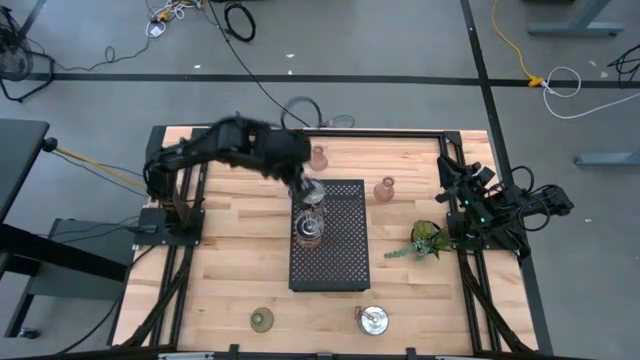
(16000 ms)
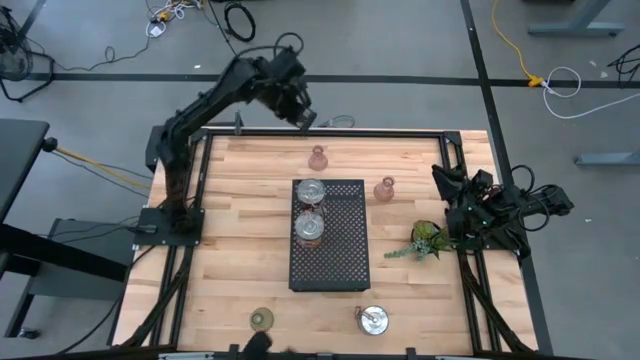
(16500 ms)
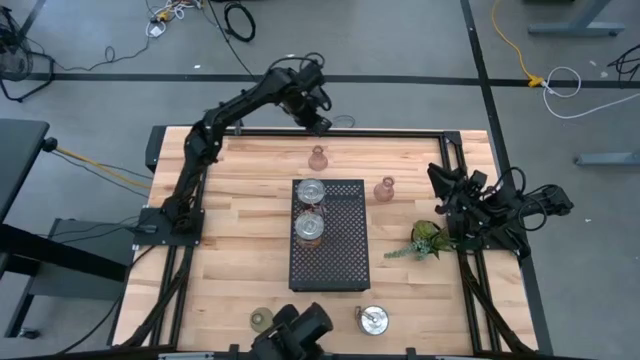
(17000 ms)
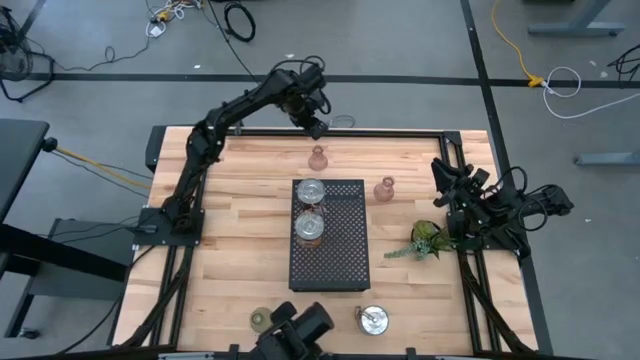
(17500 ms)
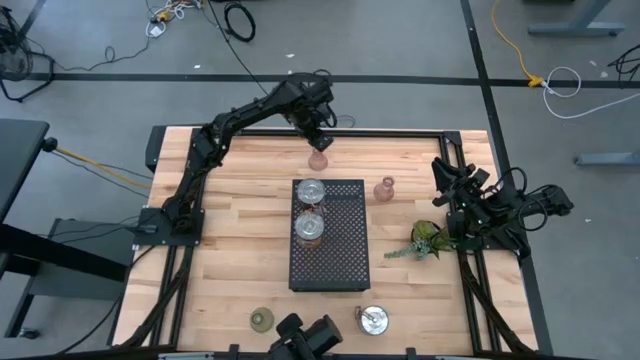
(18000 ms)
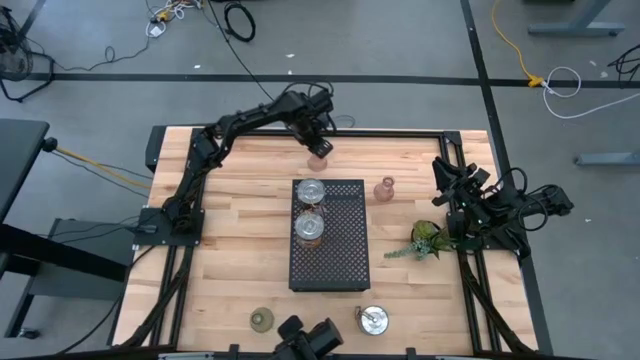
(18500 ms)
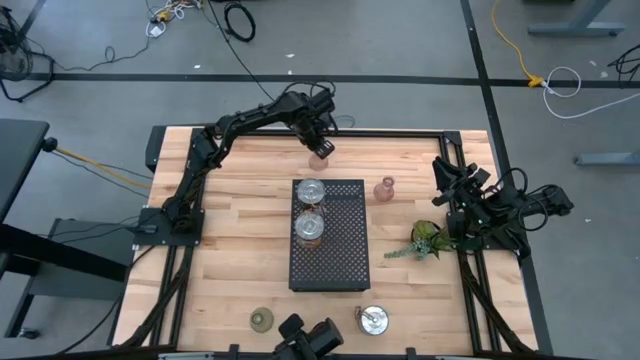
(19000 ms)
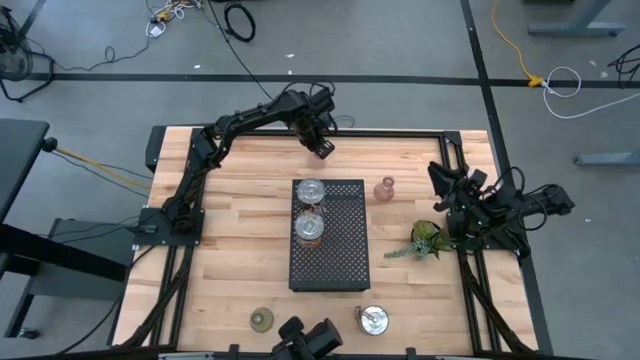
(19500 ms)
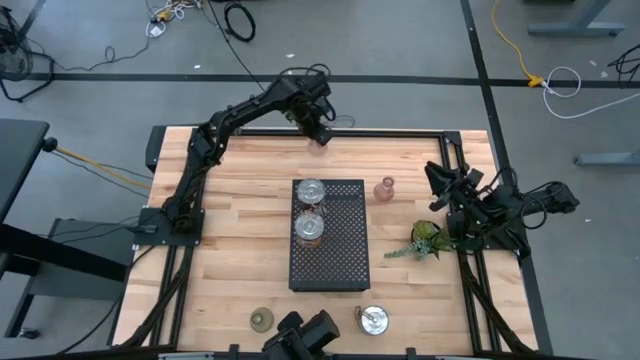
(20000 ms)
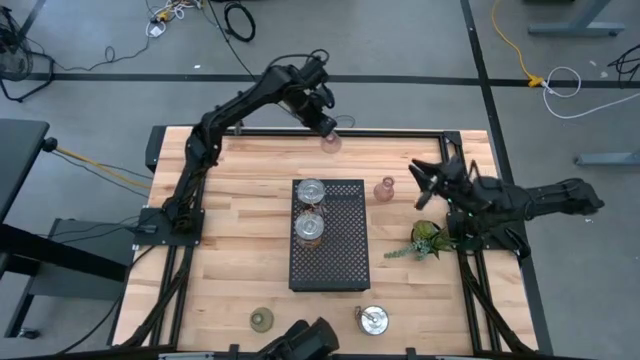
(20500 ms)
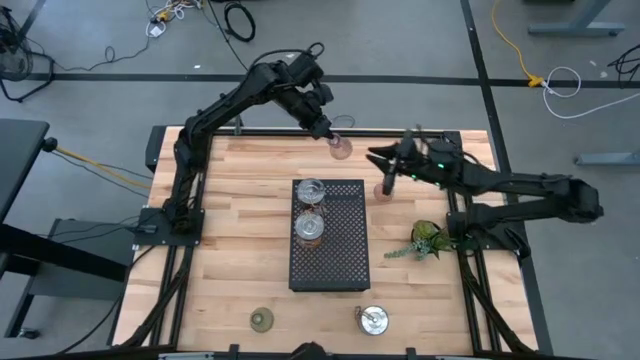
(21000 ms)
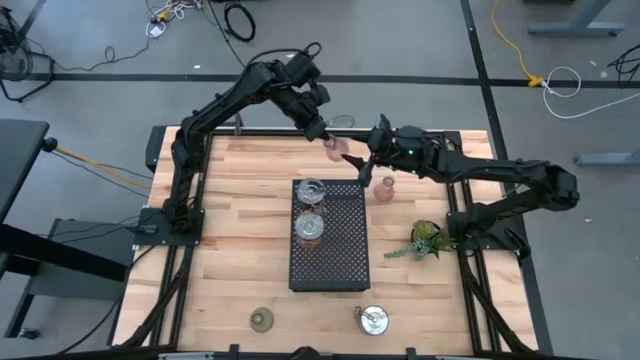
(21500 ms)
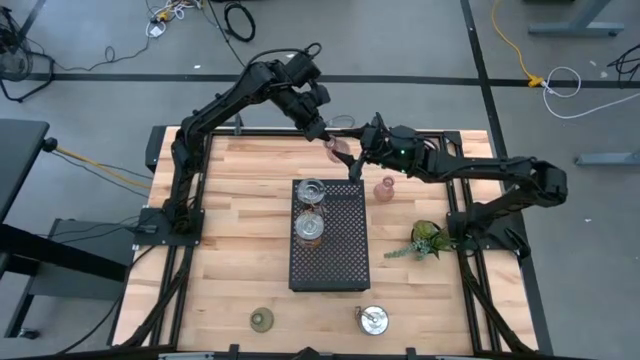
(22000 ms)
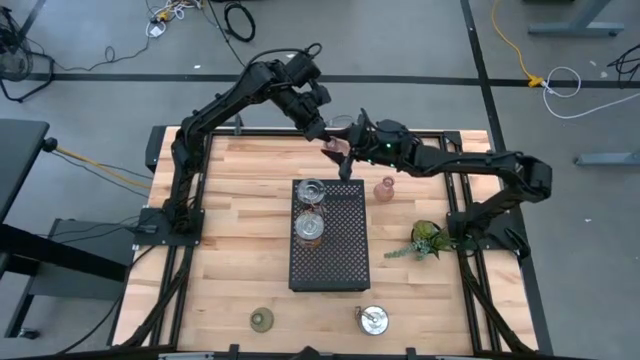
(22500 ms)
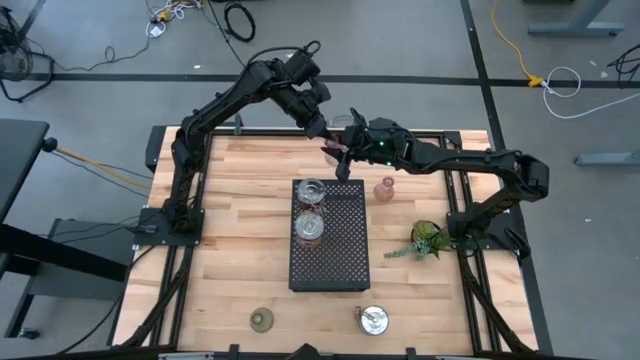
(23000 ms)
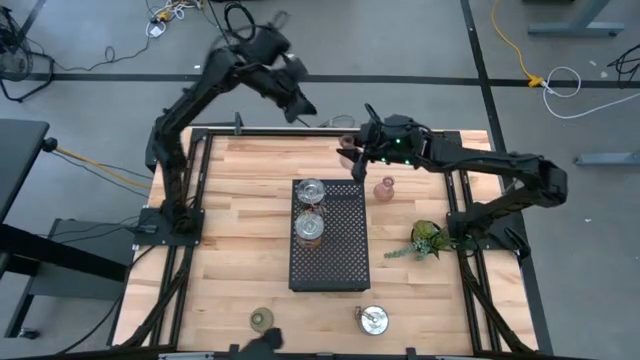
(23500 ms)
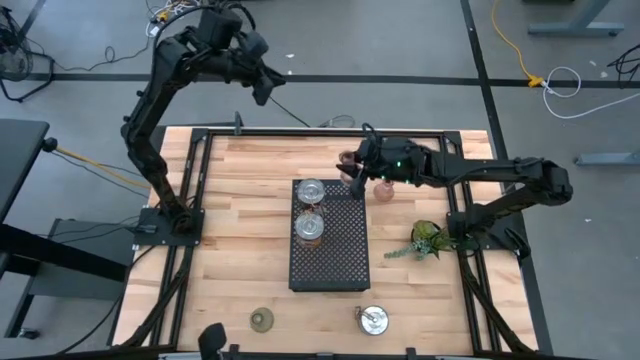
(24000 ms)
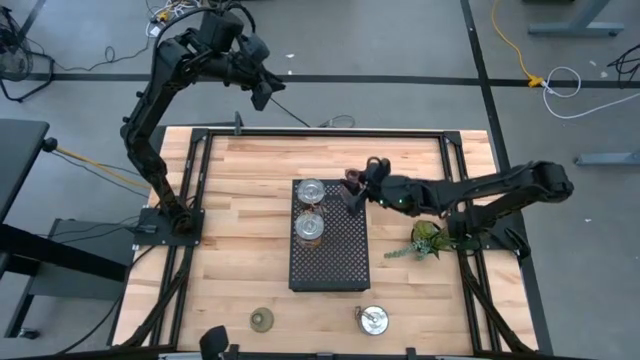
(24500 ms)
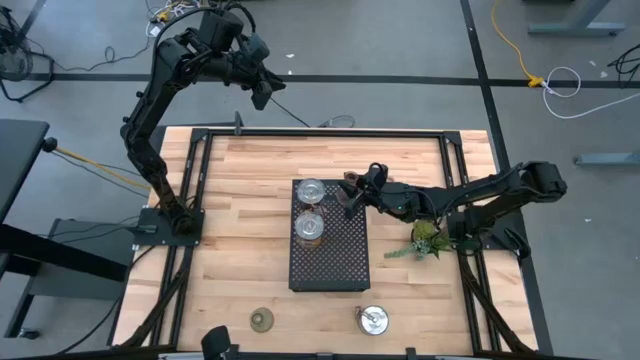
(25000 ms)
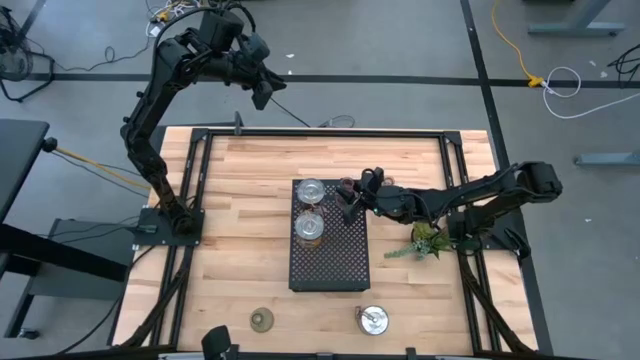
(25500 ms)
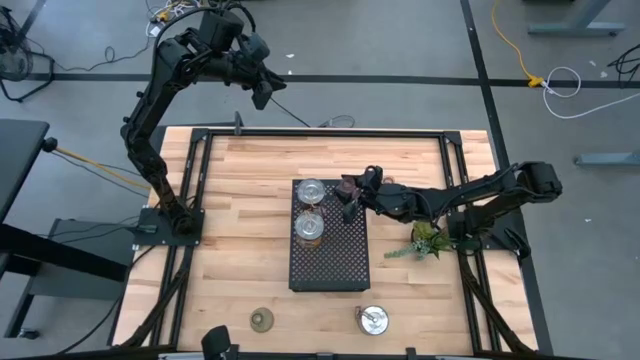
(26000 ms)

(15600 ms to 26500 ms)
Task: Pick & Place candle stick holders
Put the left pink glass candle holder on the shelf

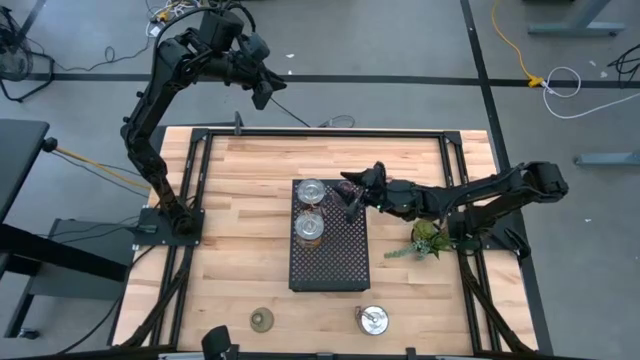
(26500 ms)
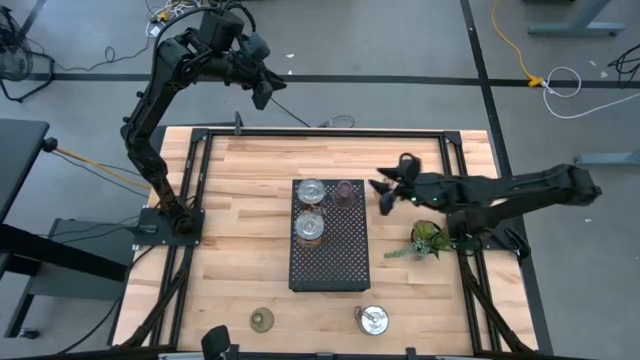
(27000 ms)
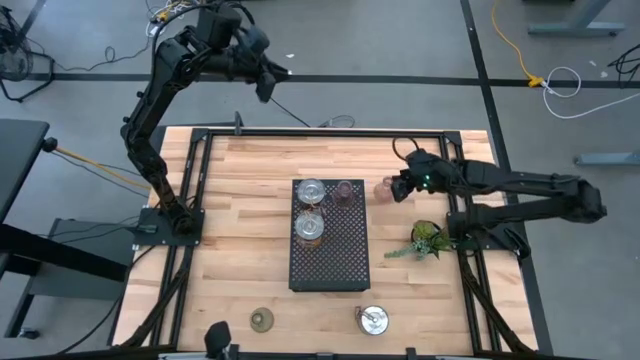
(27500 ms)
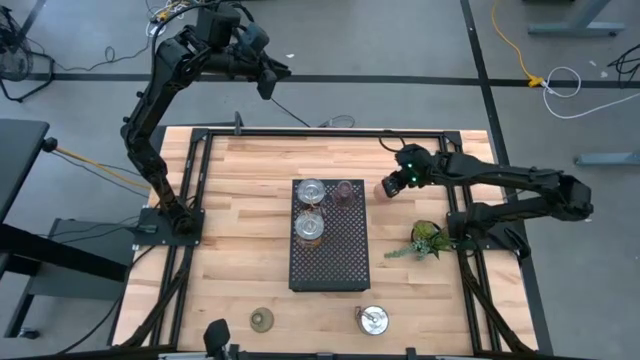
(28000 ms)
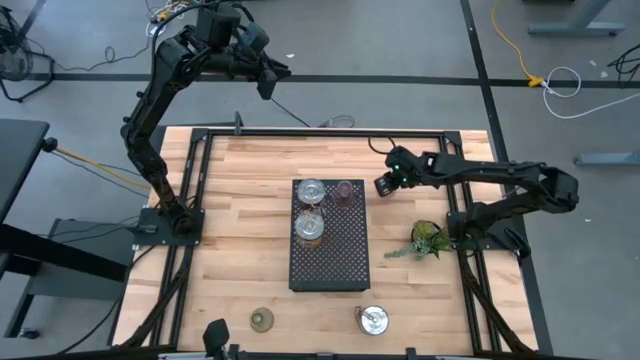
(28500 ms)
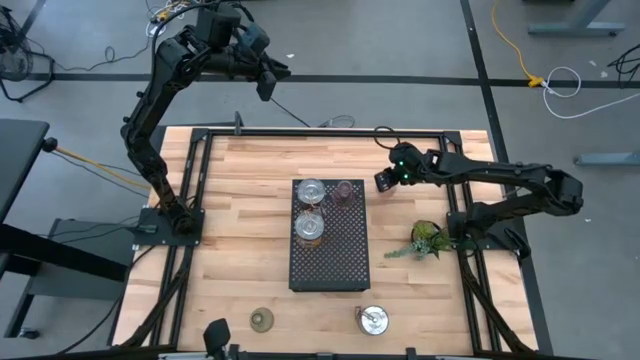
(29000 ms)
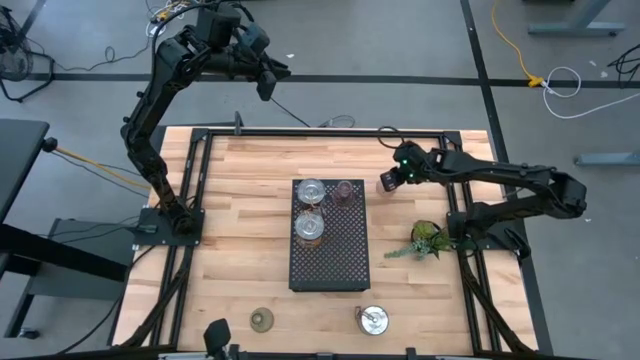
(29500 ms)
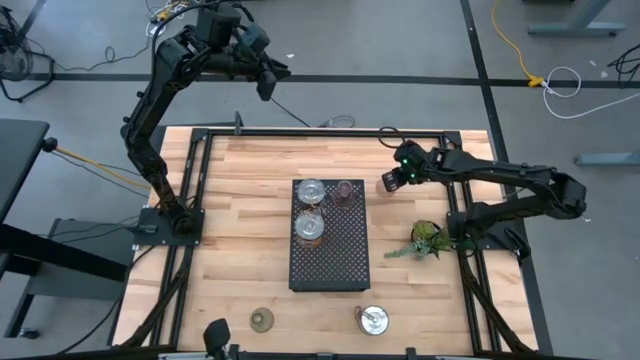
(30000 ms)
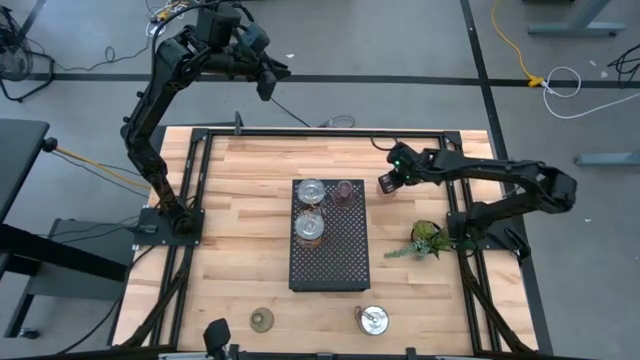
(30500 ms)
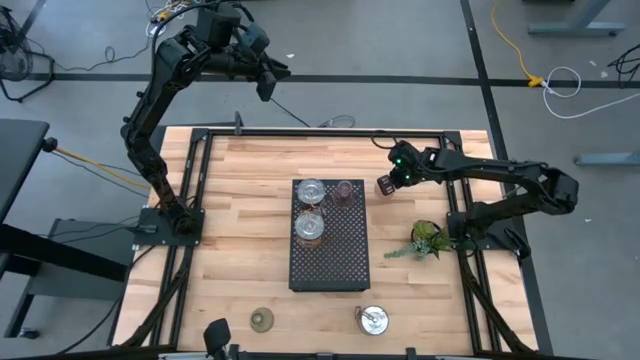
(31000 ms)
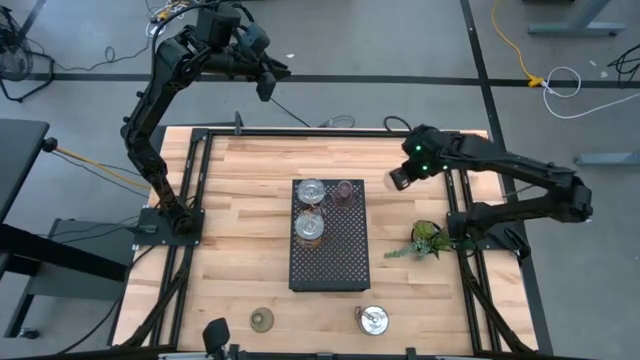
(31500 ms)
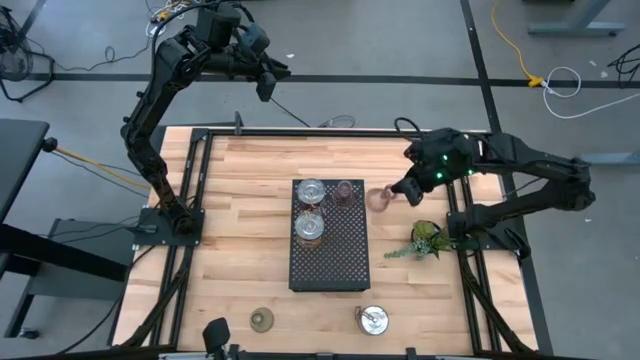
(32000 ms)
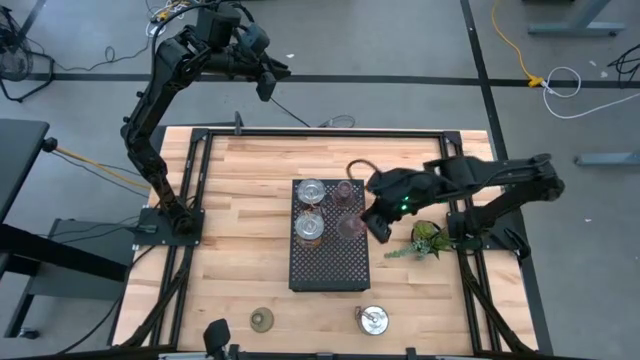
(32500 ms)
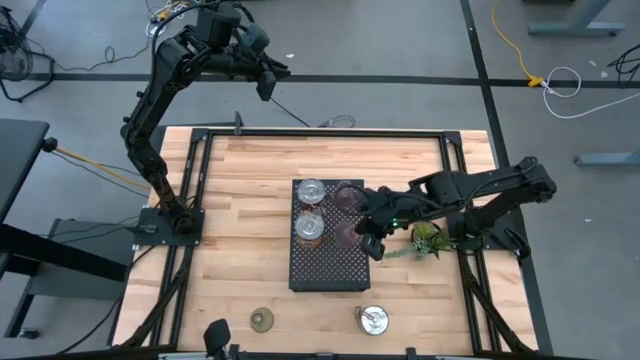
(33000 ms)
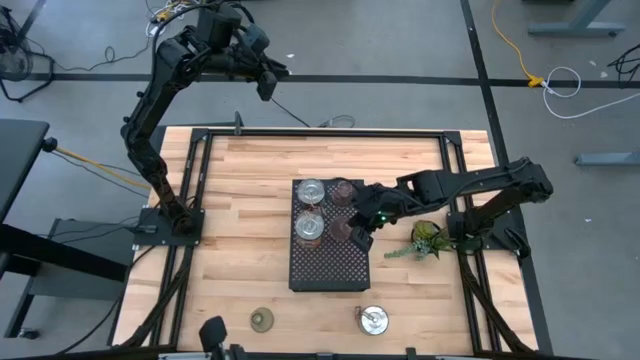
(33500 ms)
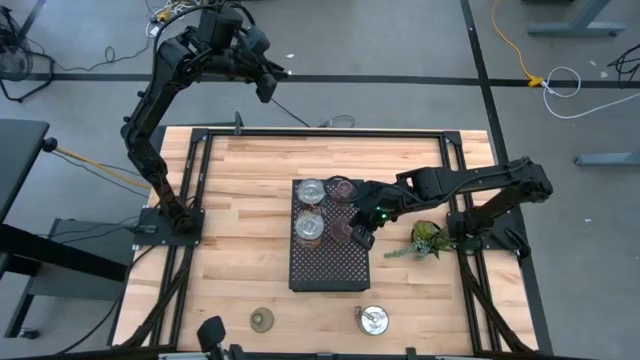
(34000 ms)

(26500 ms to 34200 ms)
Put the pink glass candle holder on the shelf

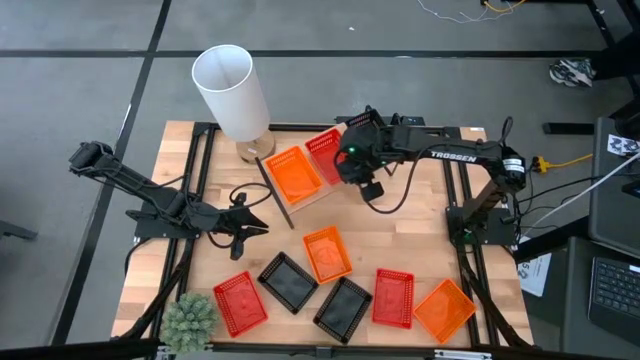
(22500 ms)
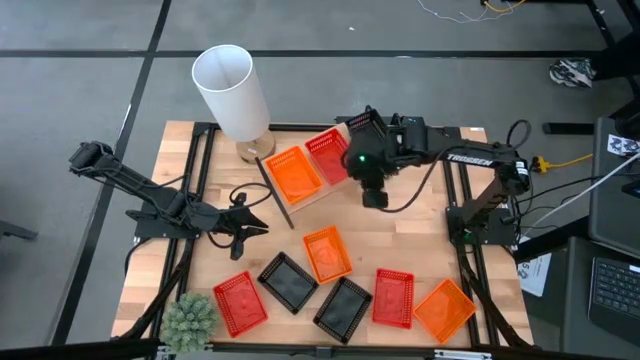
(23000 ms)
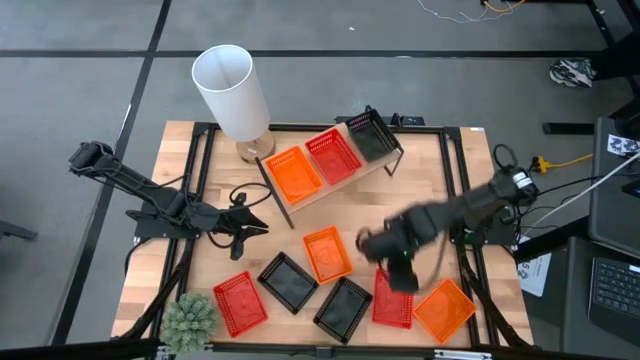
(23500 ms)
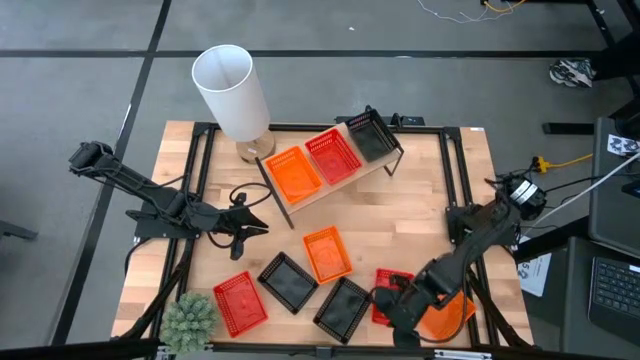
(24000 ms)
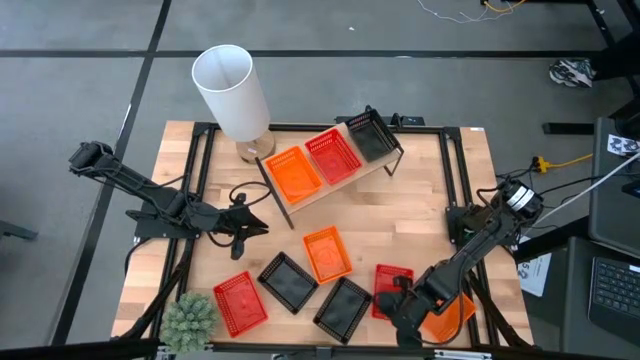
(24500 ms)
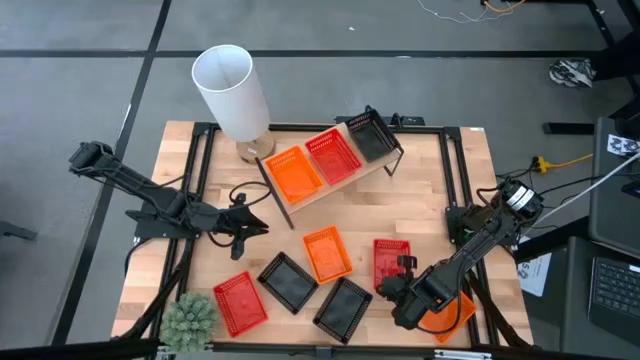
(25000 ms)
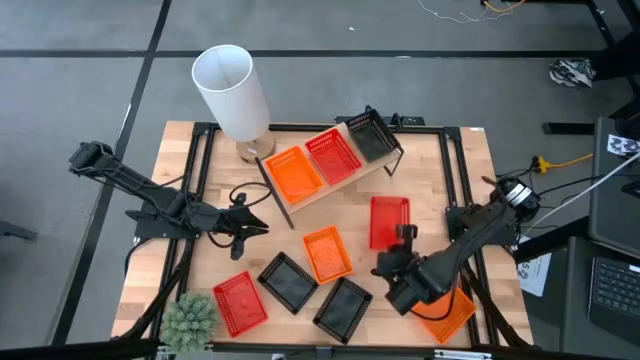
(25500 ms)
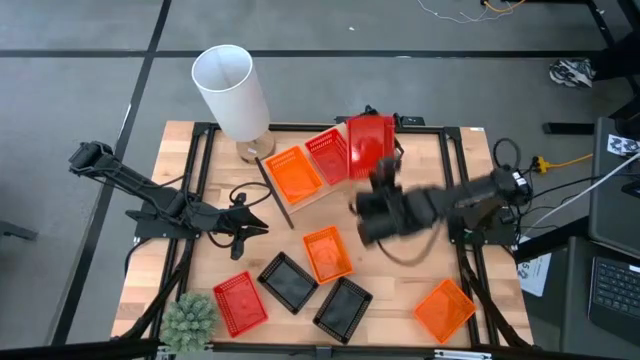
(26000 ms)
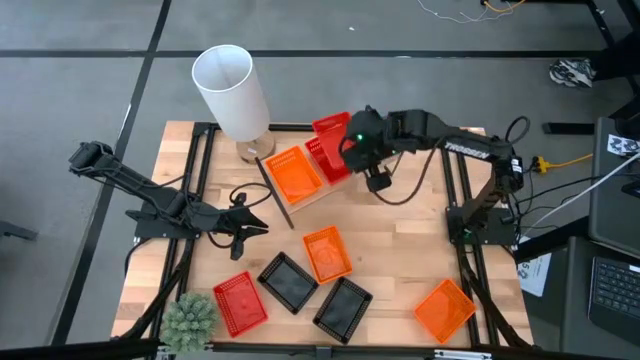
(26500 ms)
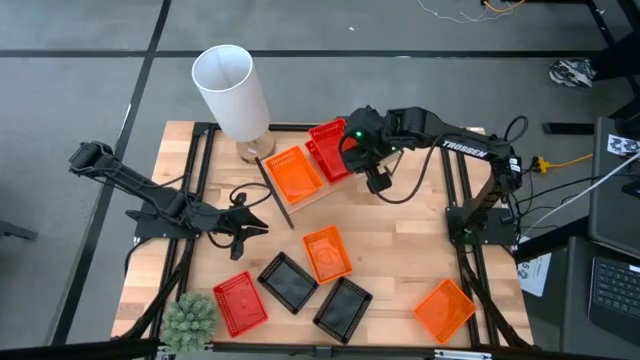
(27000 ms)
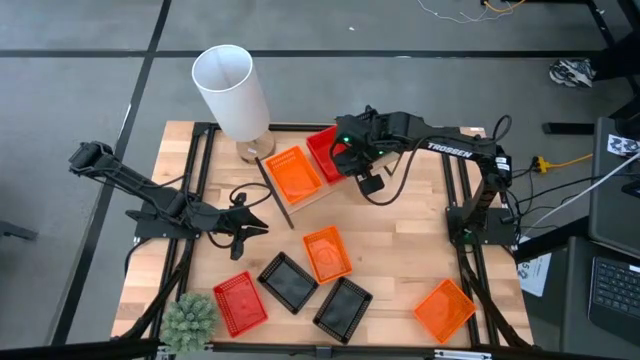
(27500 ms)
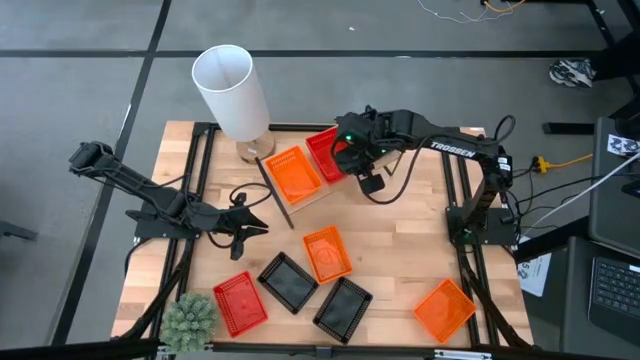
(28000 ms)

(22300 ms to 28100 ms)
Task: Stack baskets on shelf by color
Stack the right red basket on top of the other red basket on the shelf
